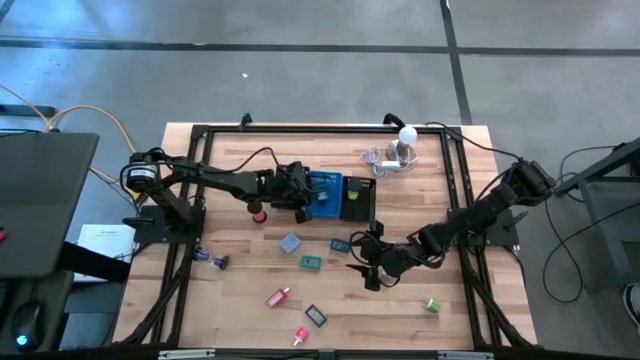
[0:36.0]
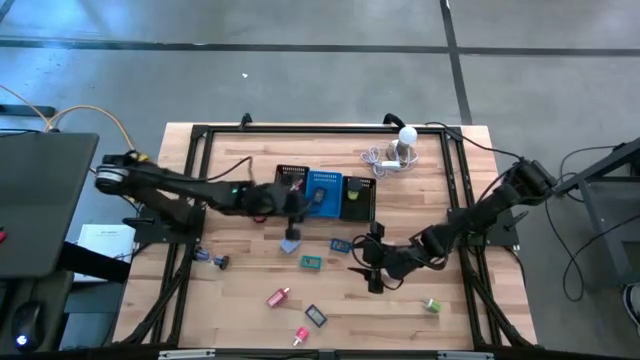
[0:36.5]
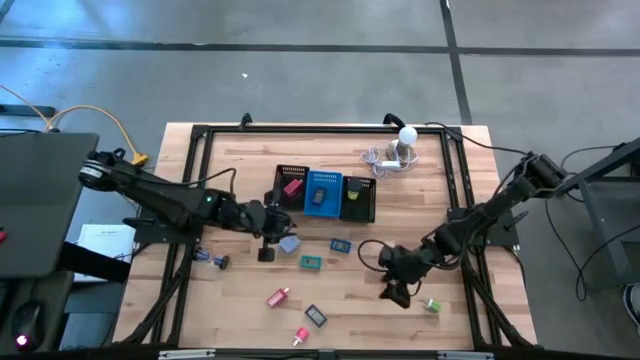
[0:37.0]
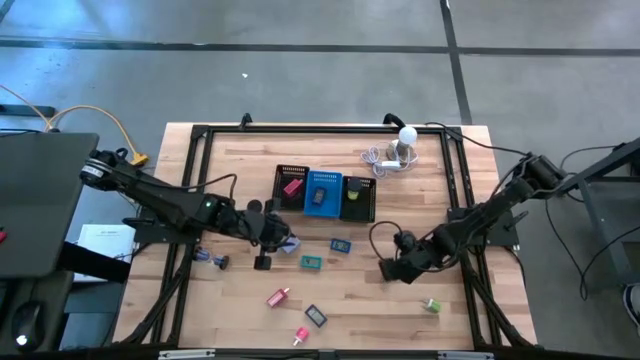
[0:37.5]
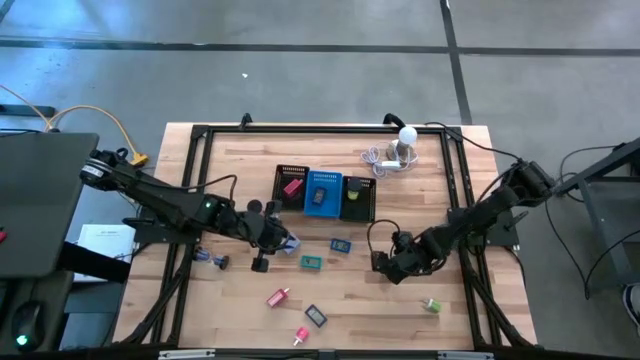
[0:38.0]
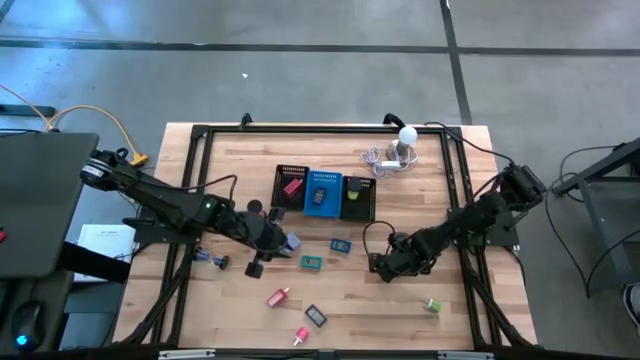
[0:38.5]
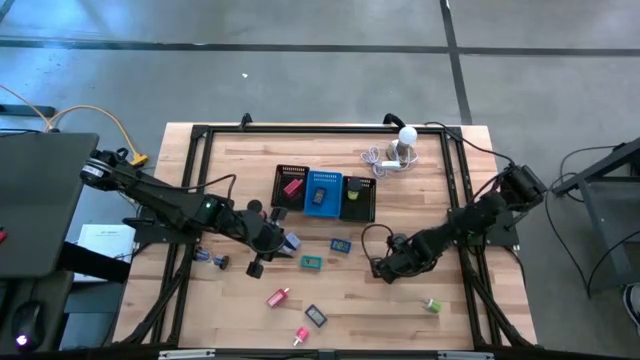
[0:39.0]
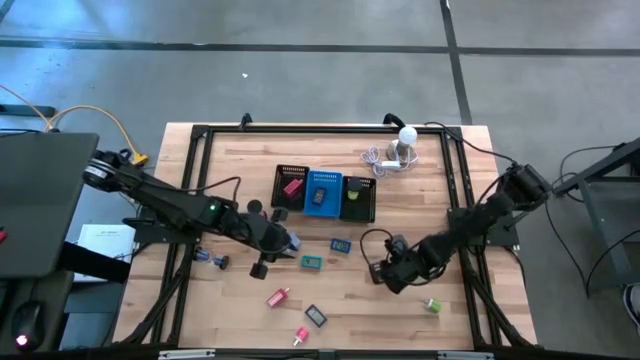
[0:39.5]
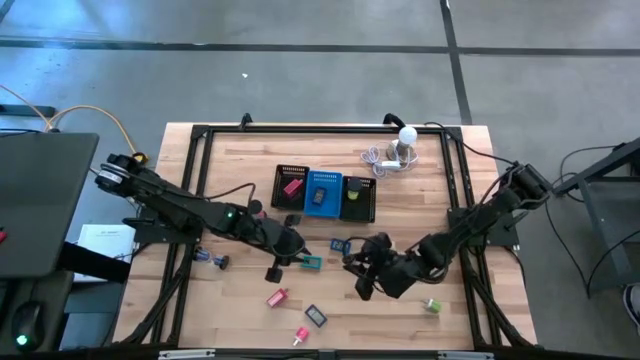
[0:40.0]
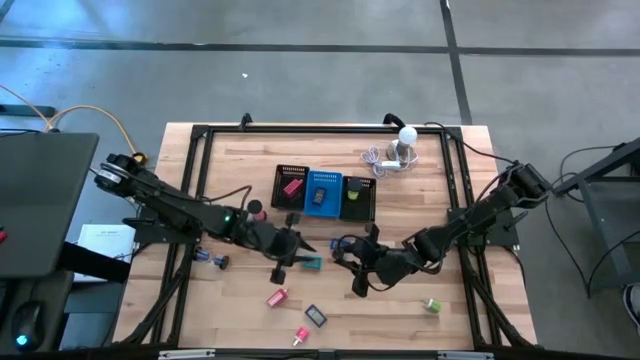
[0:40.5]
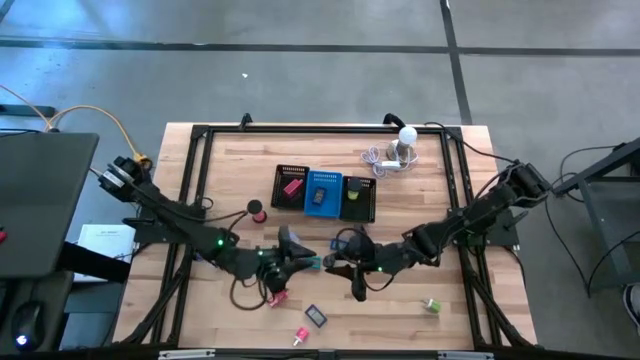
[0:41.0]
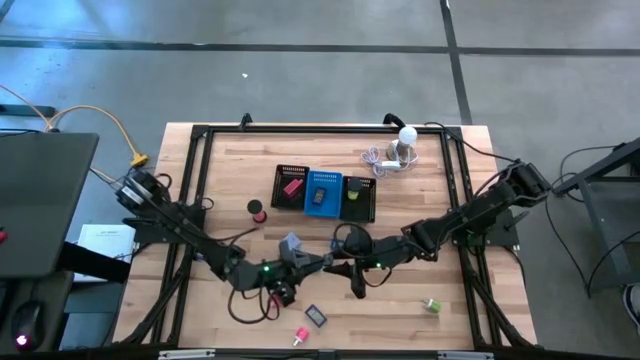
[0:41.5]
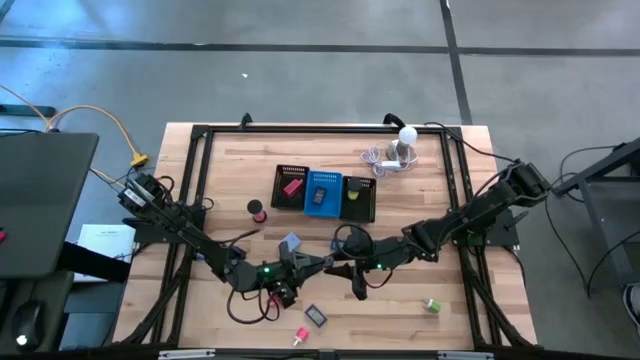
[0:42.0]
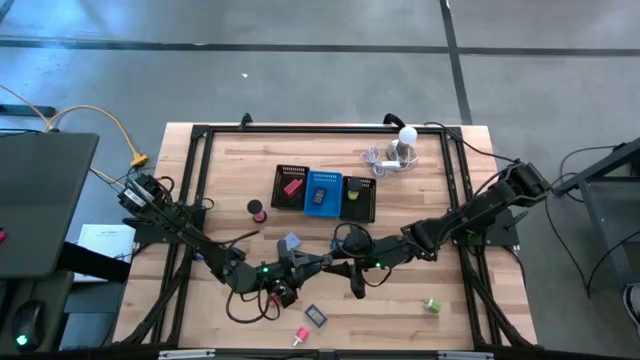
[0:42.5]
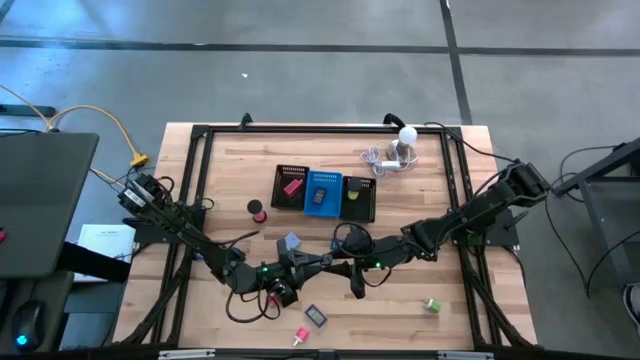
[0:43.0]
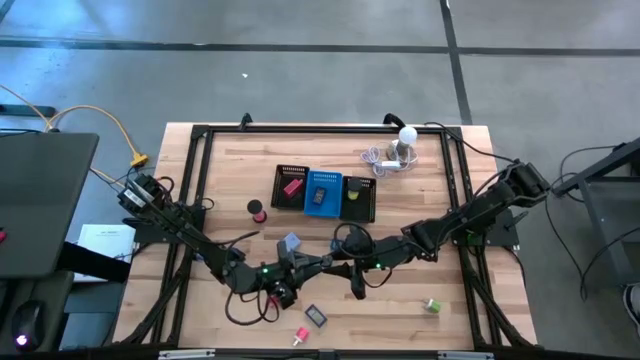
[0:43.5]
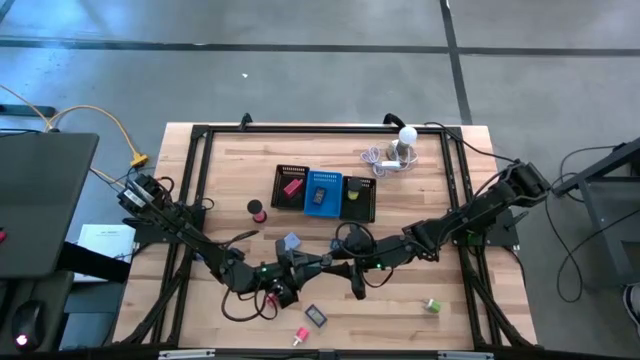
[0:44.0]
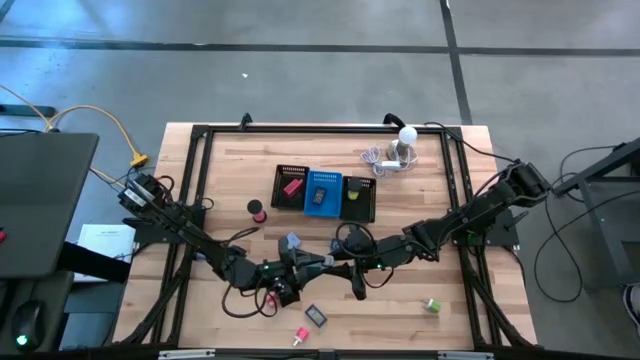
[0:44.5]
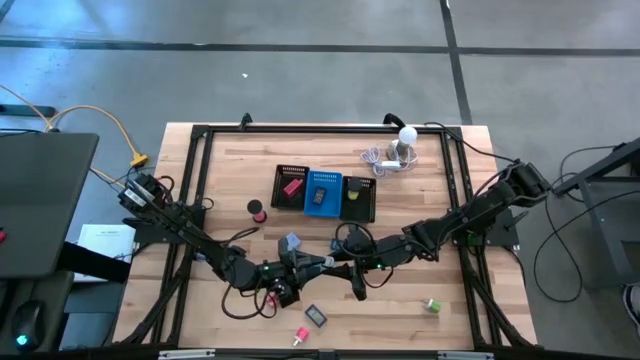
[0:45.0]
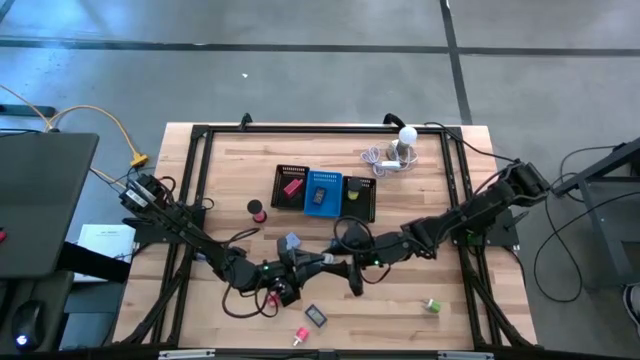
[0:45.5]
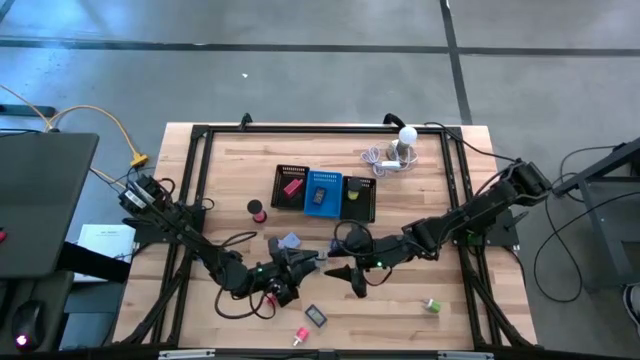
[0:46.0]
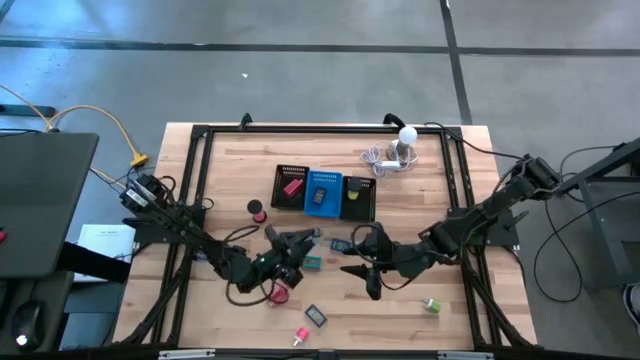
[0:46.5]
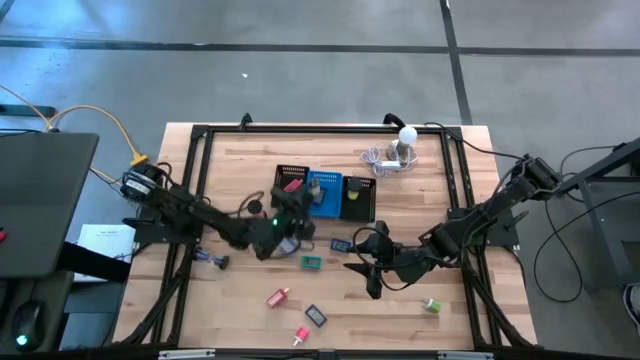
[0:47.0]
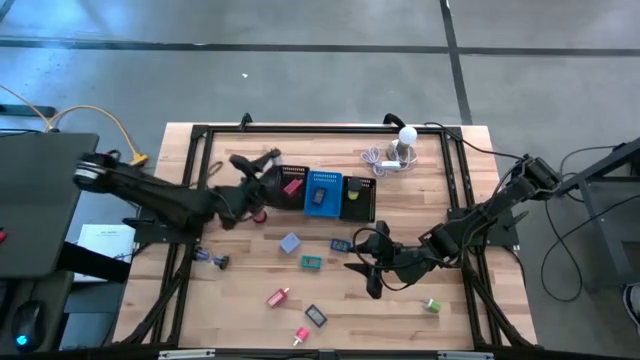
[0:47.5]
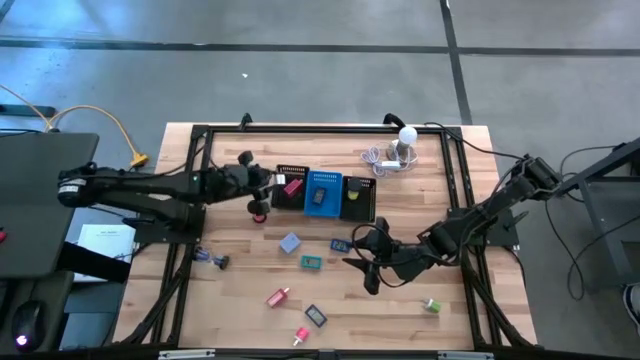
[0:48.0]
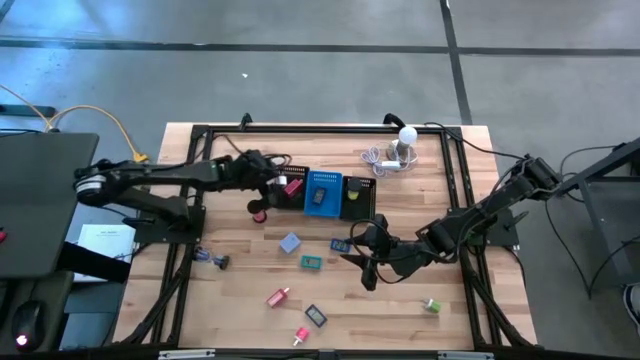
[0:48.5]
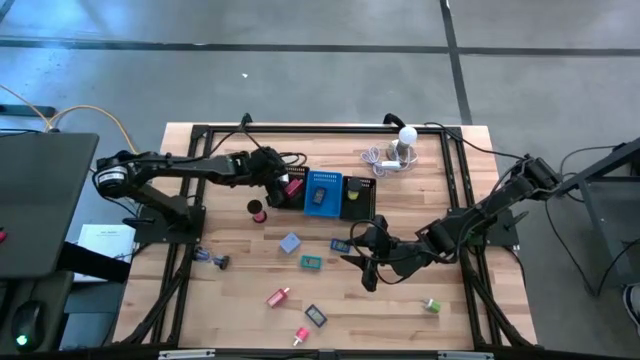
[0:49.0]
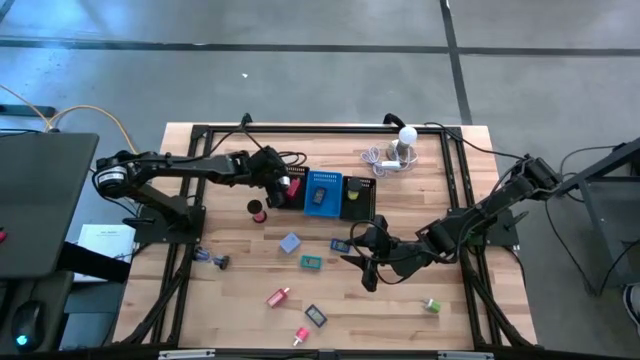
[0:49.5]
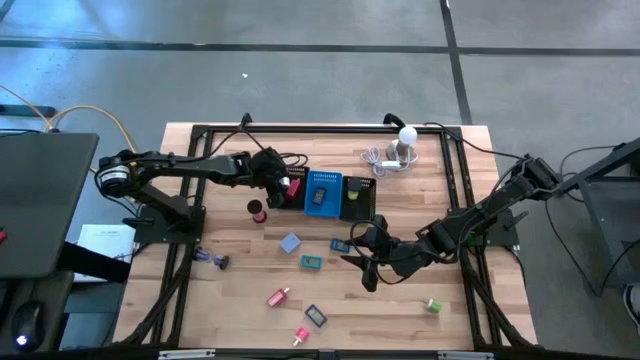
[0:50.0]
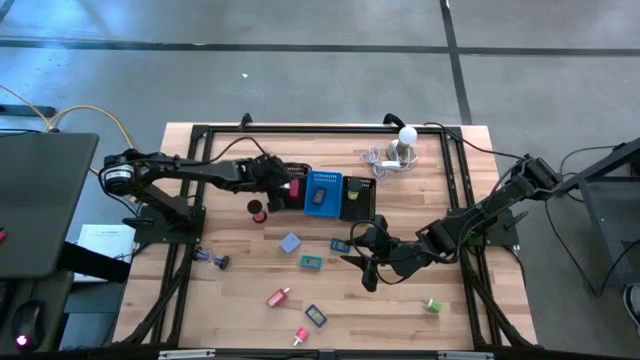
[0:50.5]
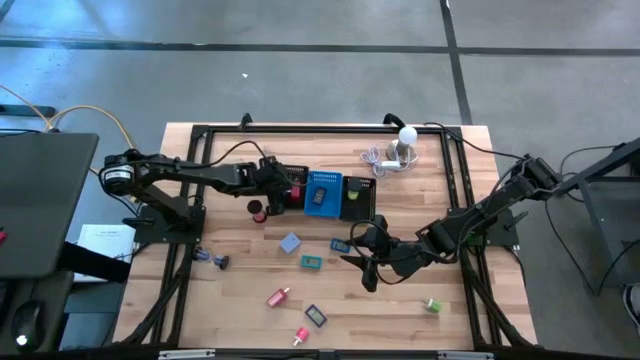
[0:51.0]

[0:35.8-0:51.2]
Task: Pick & Place Office items
Put the white charger adapter into the left black bin
